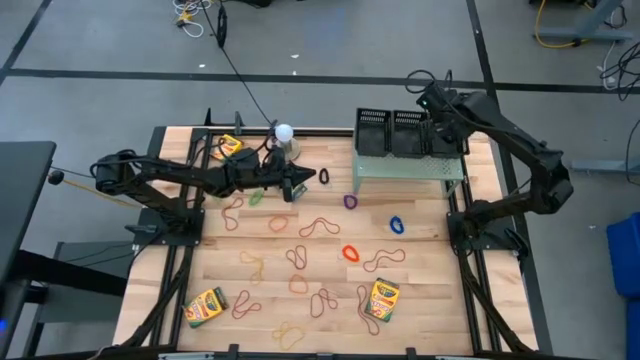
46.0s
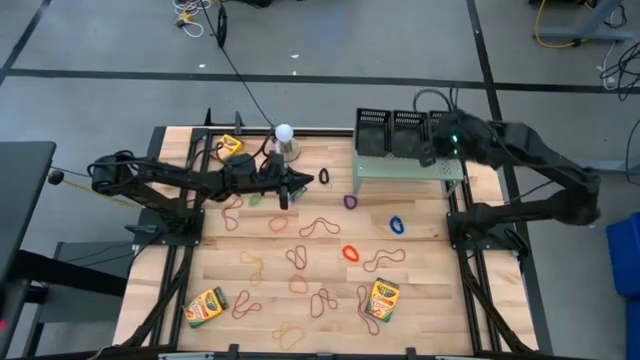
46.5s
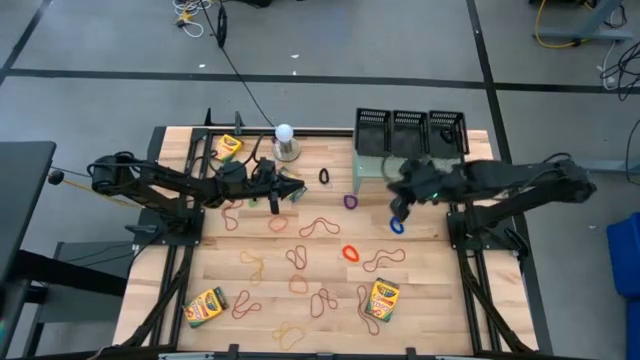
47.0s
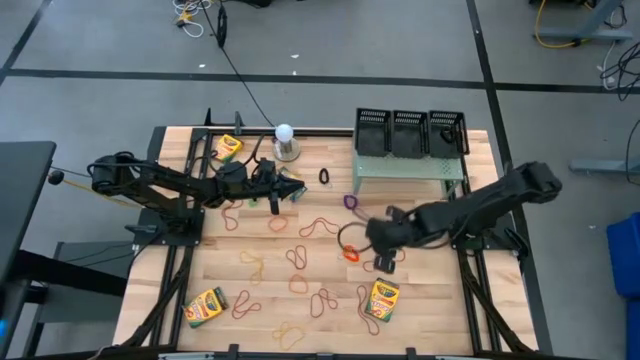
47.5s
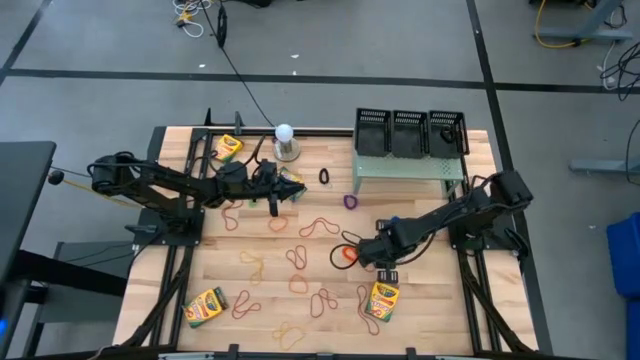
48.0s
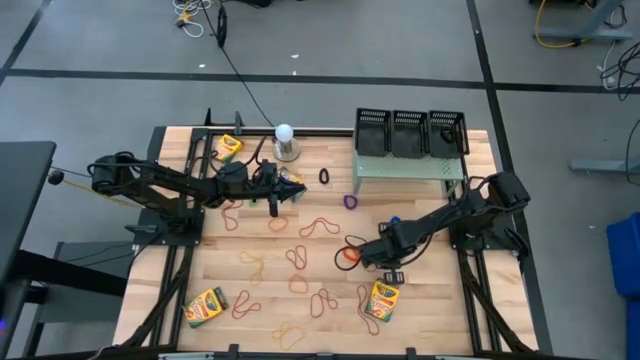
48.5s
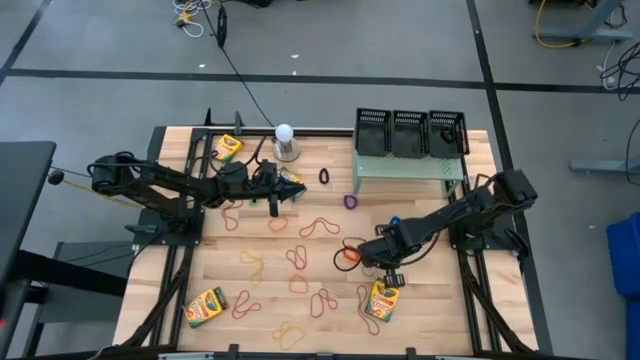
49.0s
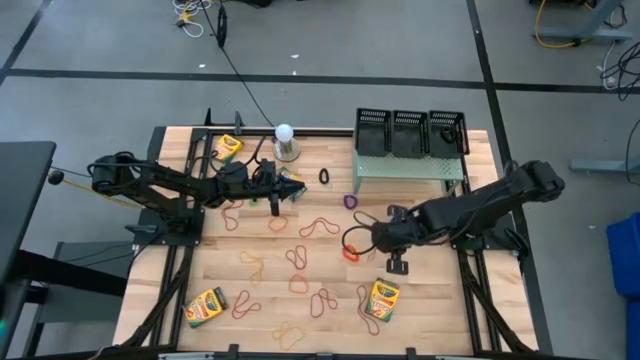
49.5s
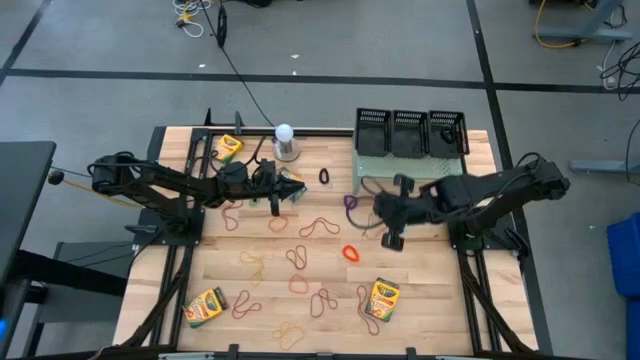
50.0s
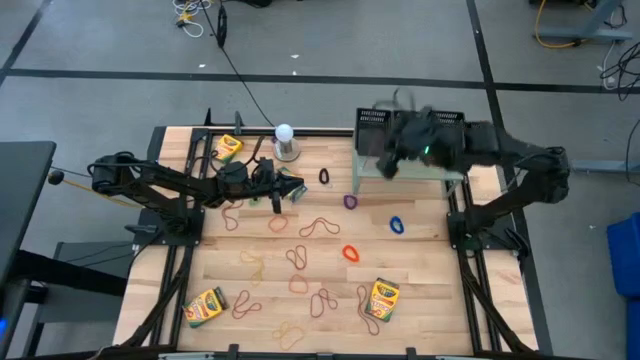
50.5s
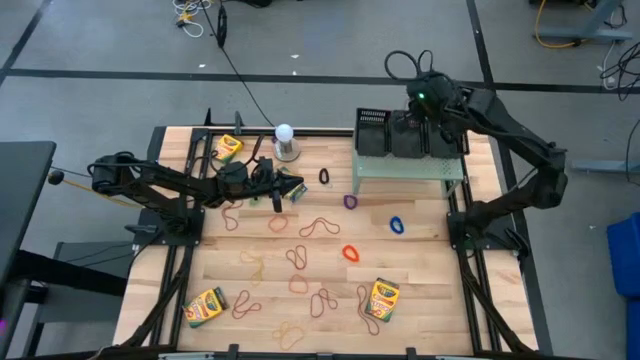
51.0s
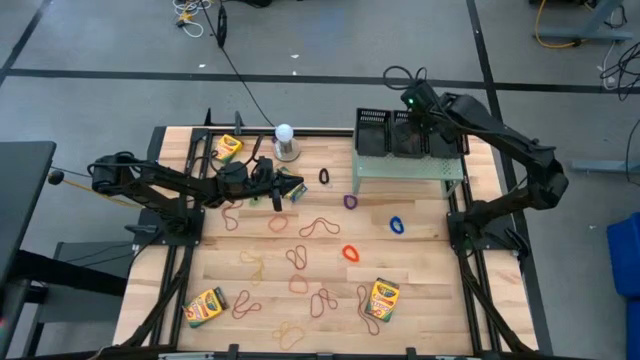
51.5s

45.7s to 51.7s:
Task: Pick & Place Office Desk Supplies
Put the red rubber band into the middle basket on the shelf

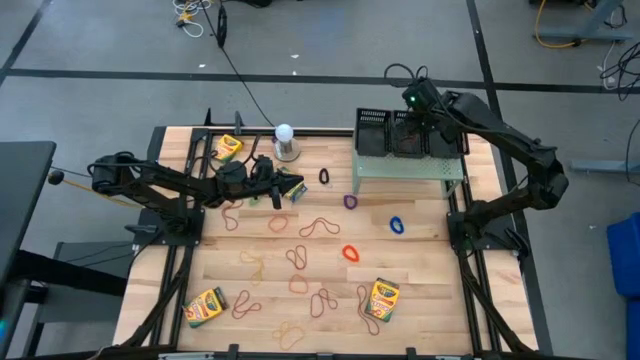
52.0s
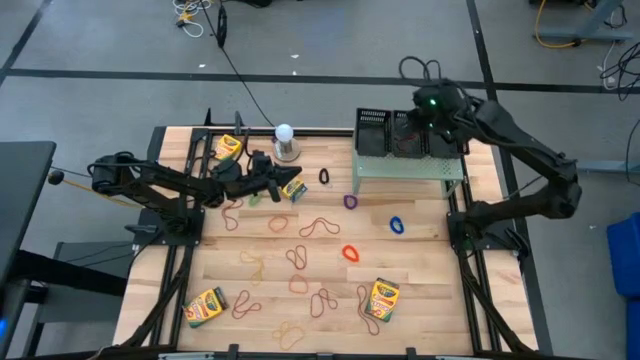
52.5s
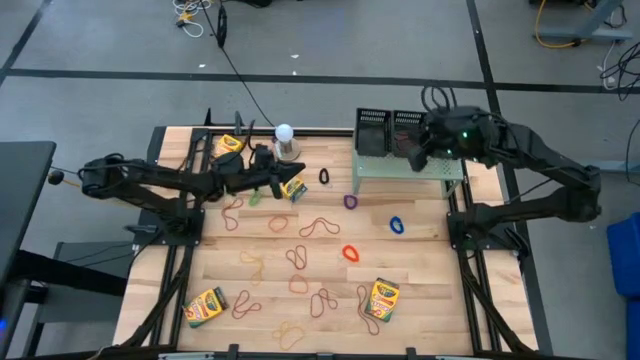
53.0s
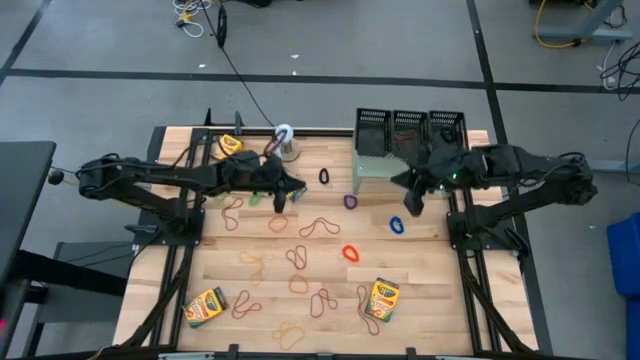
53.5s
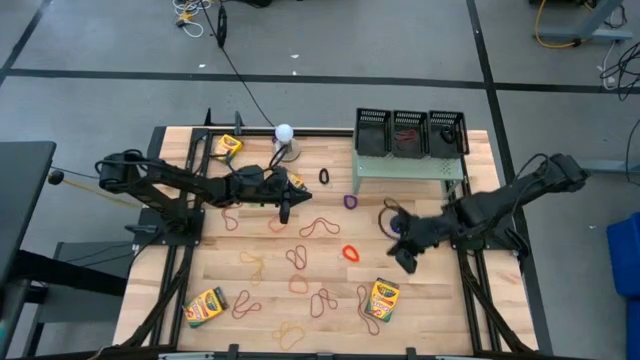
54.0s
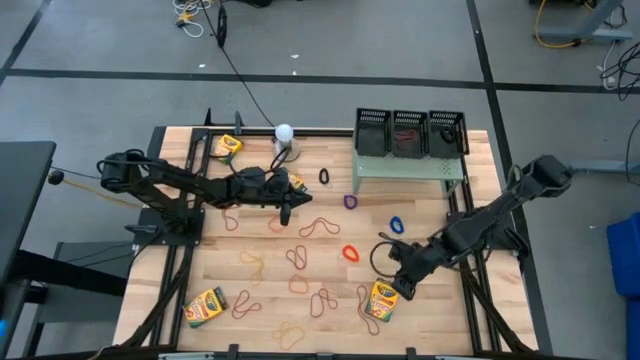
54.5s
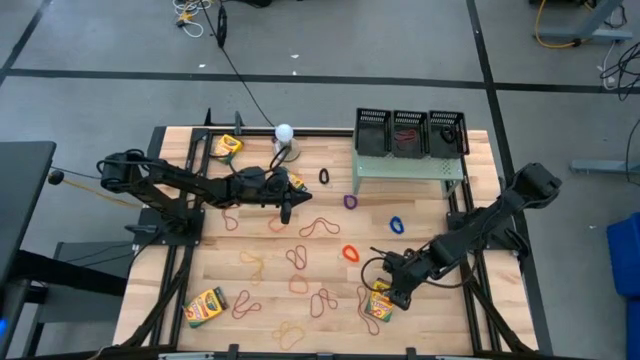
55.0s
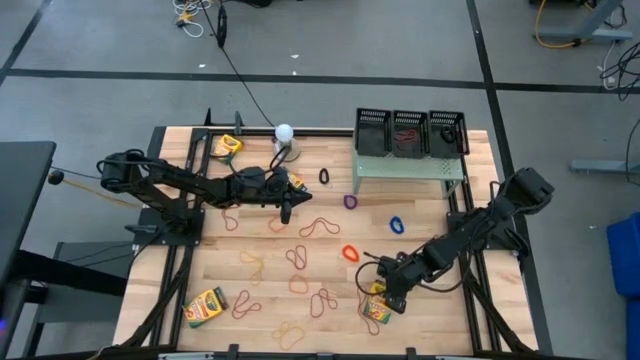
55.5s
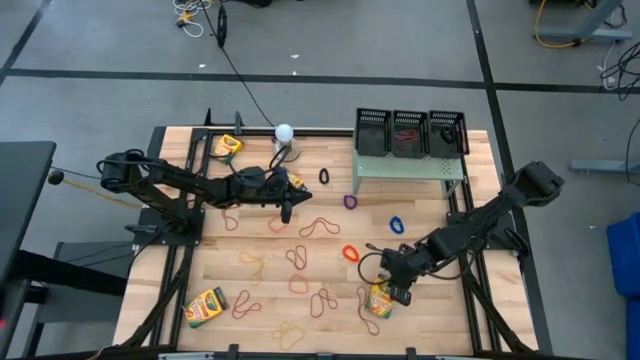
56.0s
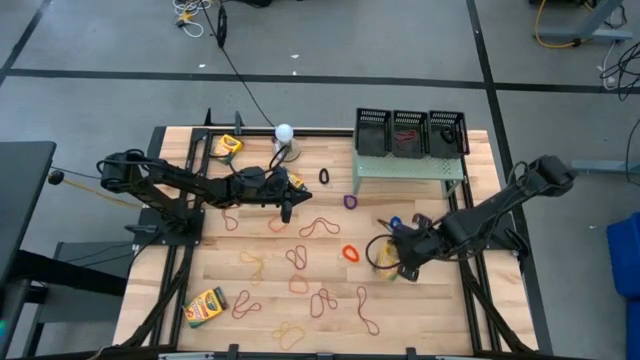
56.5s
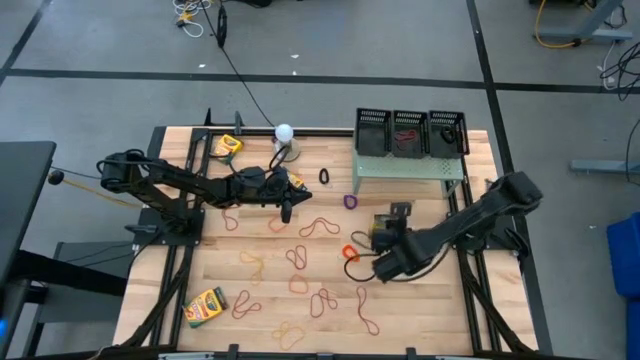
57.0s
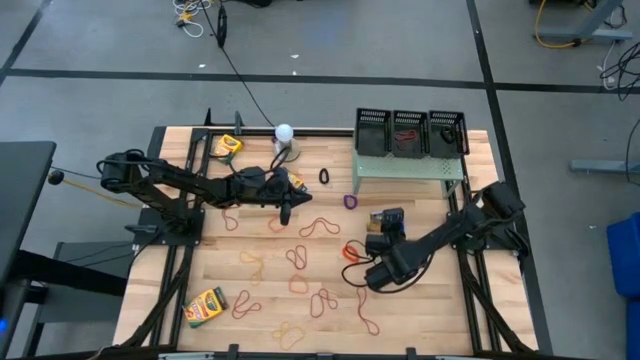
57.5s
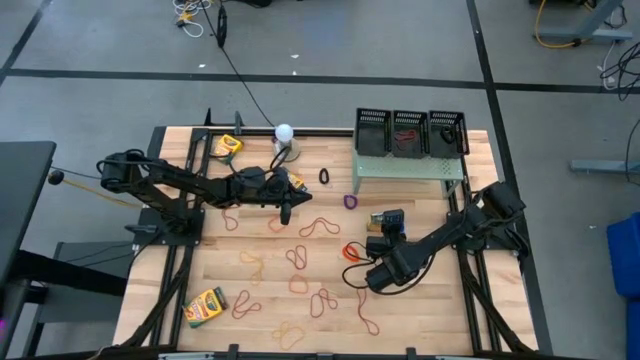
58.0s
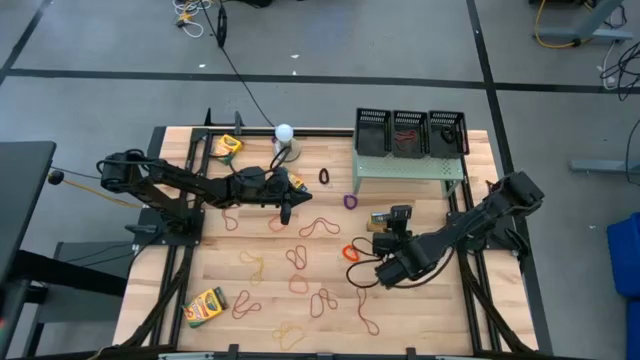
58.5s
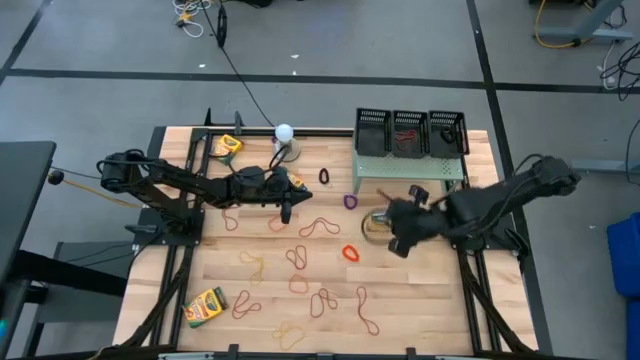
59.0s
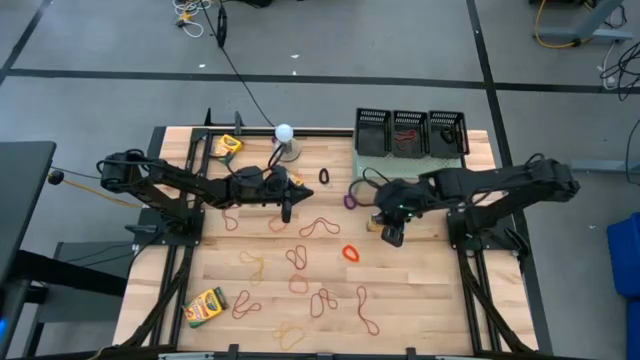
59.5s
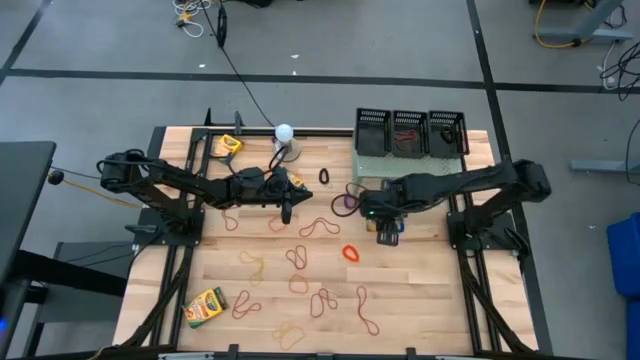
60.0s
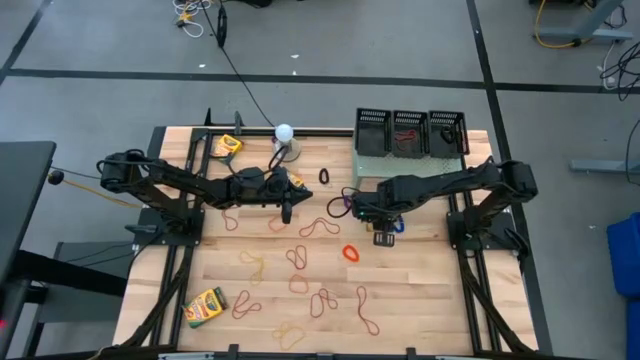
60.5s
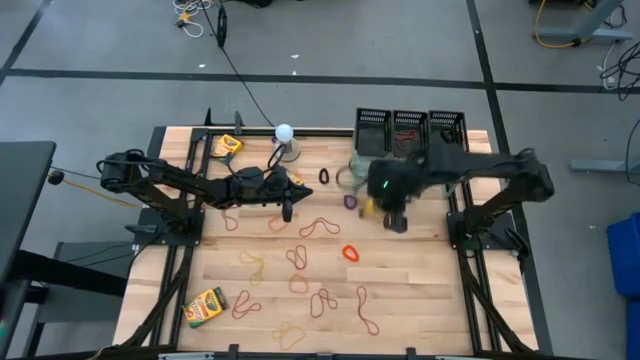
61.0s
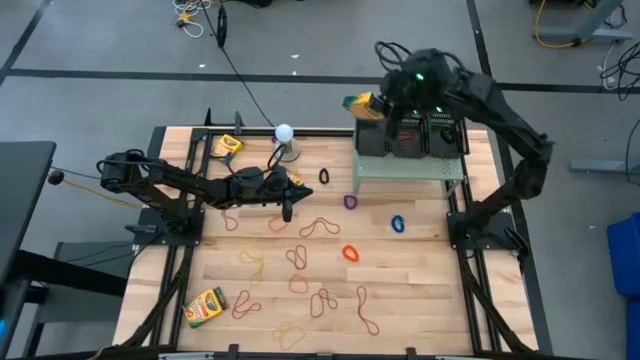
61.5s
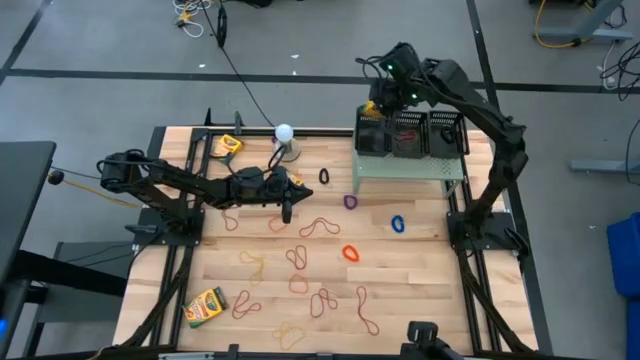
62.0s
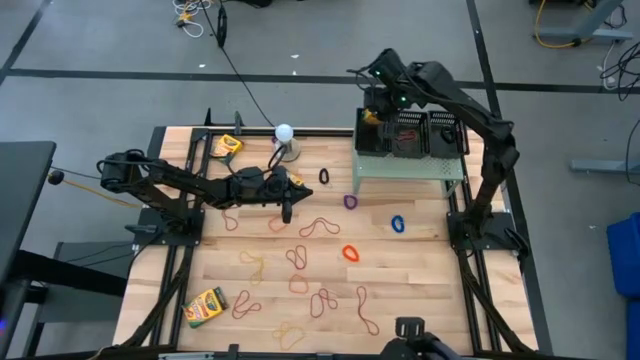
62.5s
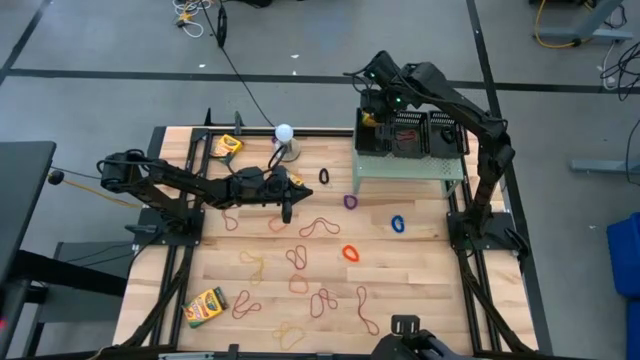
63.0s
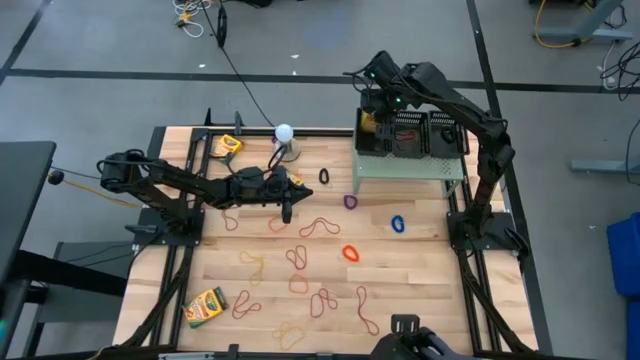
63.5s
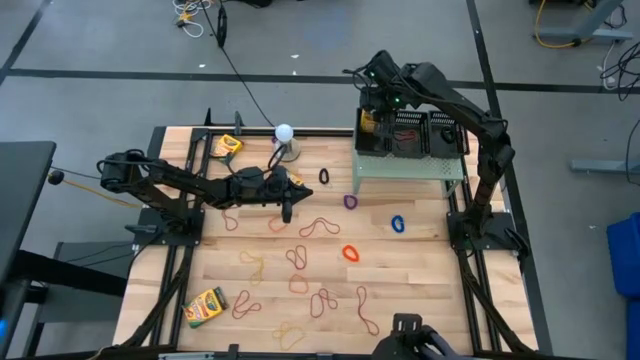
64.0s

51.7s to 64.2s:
Put the crayon box into the left basket on the shelf

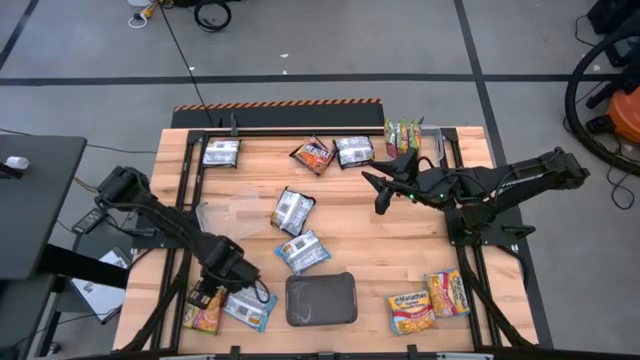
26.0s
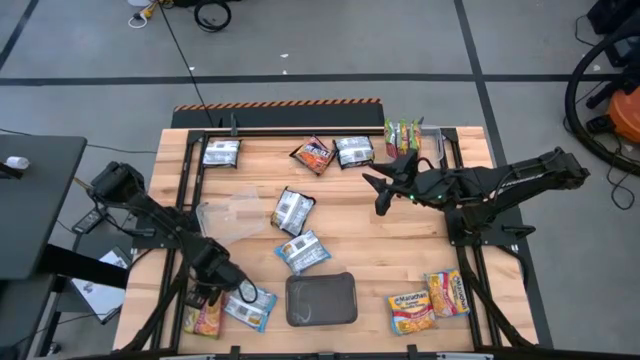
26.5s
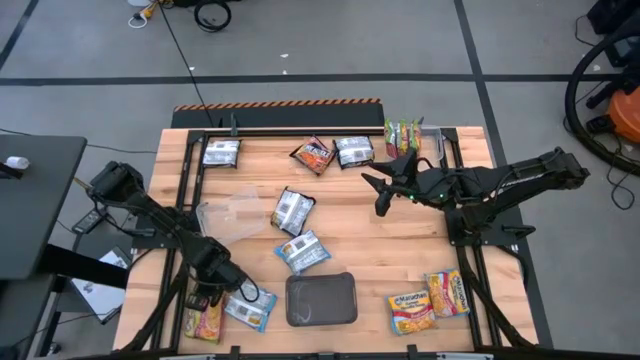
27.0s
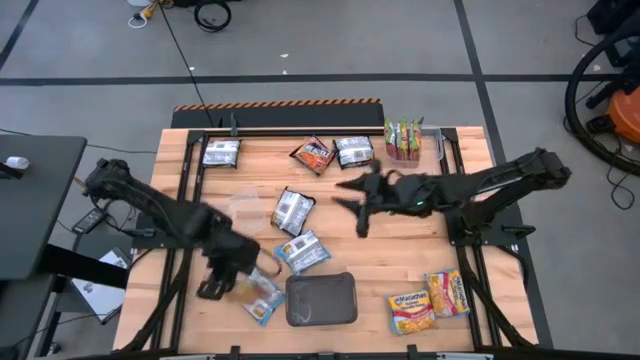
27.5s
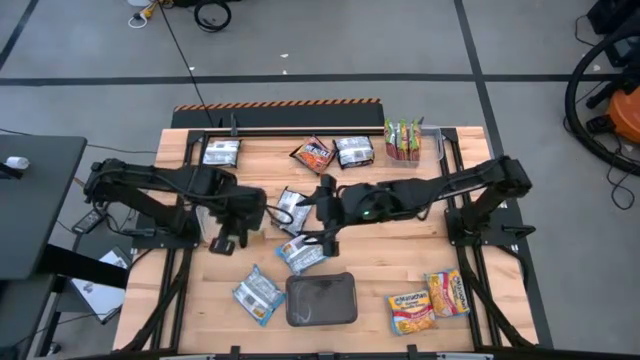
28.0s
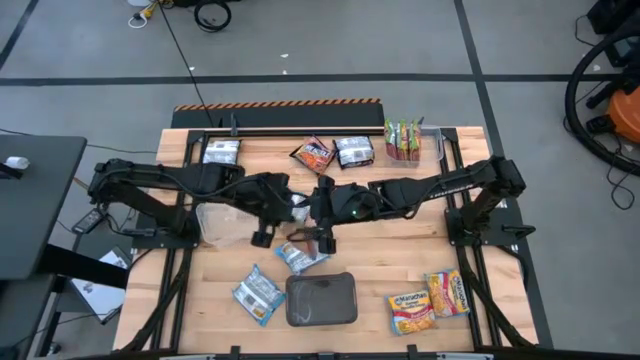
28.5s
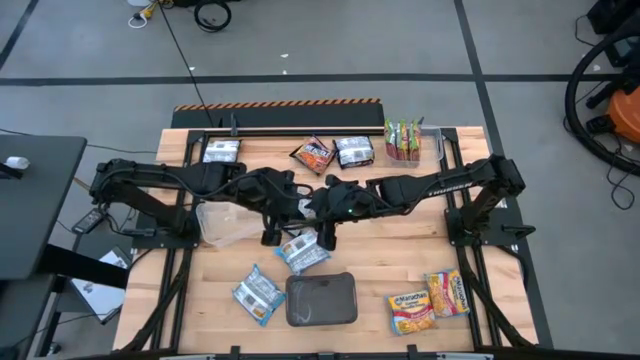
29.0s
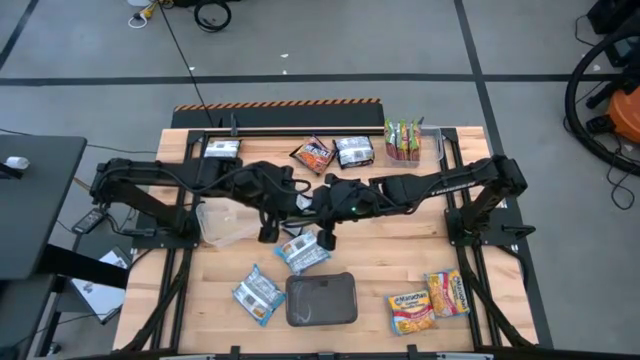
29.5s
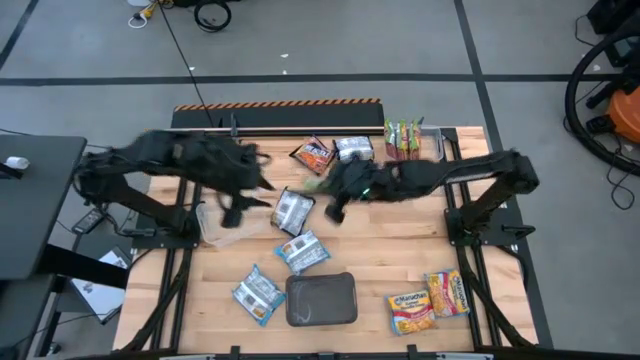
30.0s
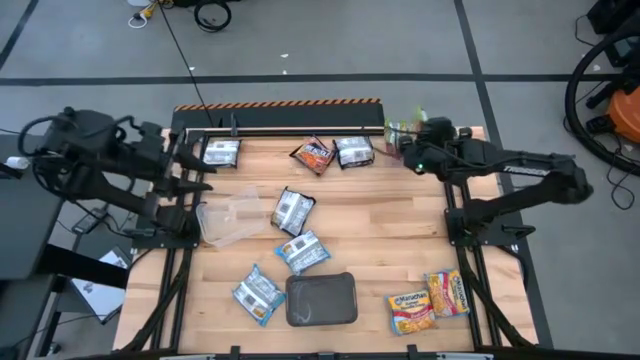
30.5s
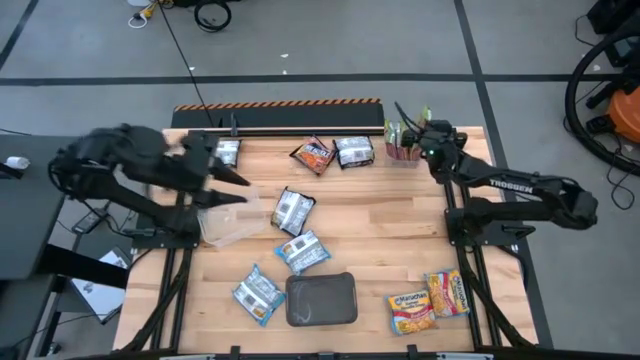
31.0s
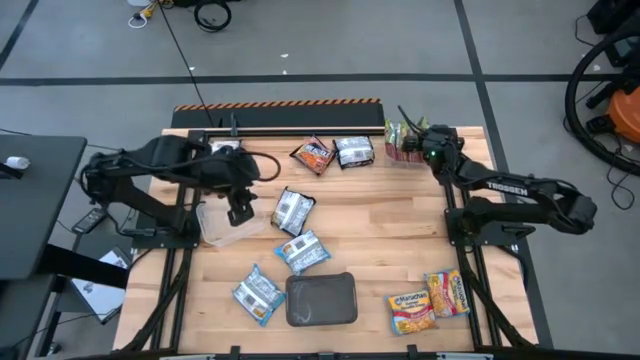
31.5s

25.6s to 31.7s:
Task: Sort Maruchan noodles
Put the green noodle pack into the top transparent bin
